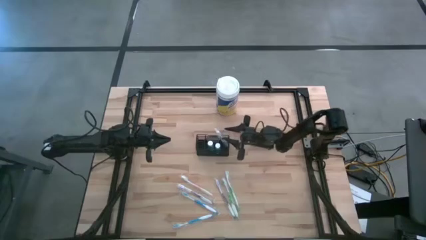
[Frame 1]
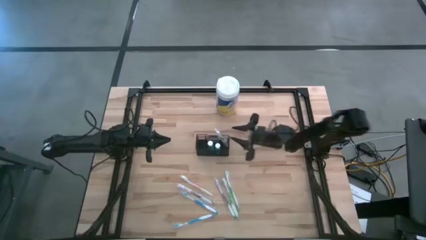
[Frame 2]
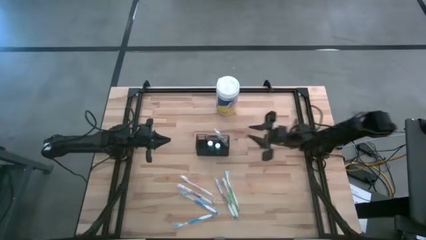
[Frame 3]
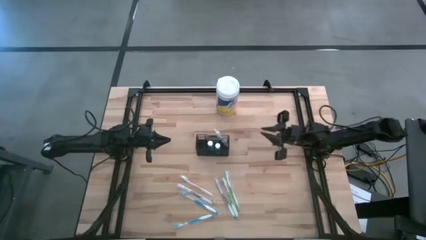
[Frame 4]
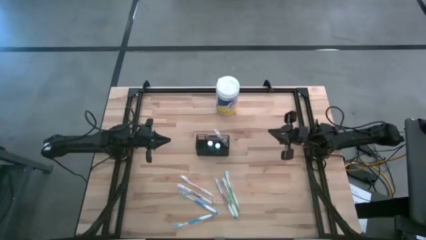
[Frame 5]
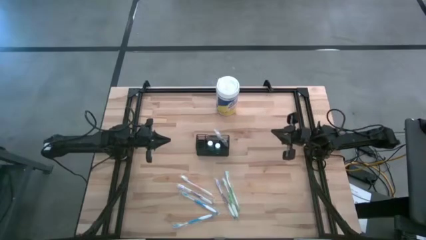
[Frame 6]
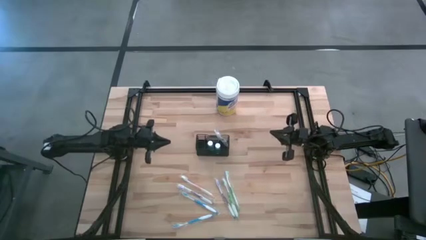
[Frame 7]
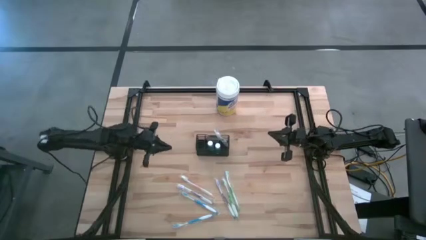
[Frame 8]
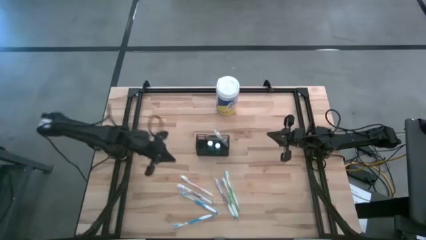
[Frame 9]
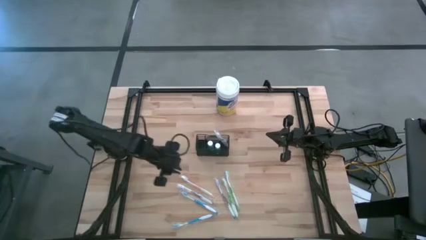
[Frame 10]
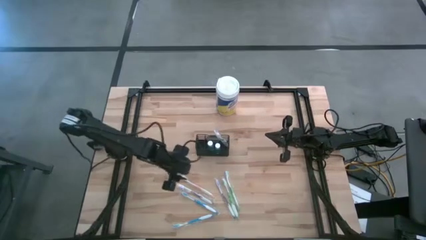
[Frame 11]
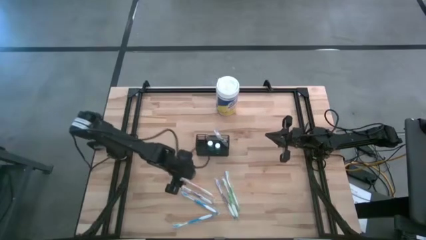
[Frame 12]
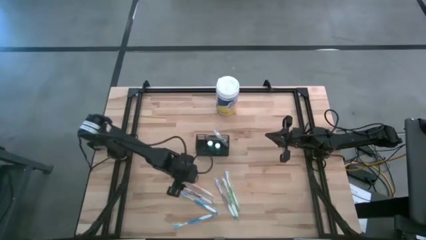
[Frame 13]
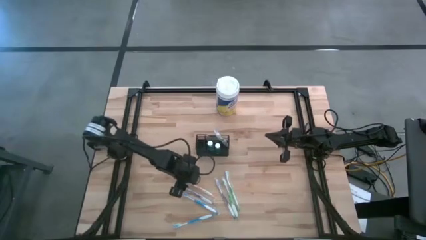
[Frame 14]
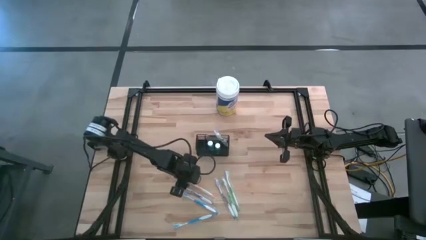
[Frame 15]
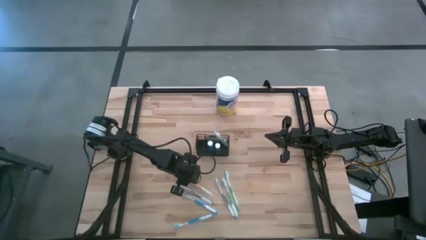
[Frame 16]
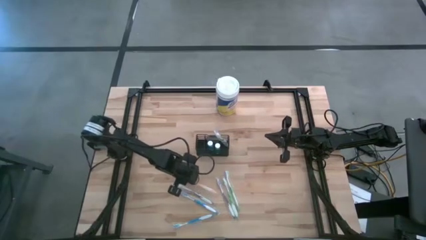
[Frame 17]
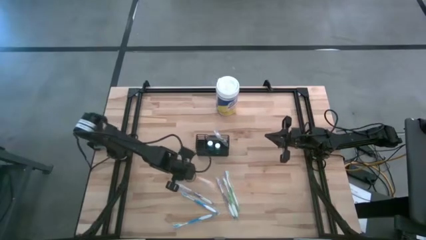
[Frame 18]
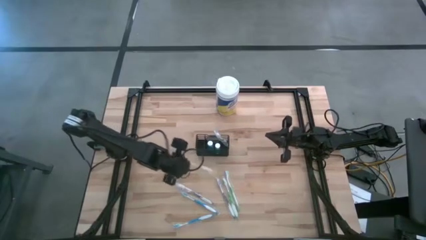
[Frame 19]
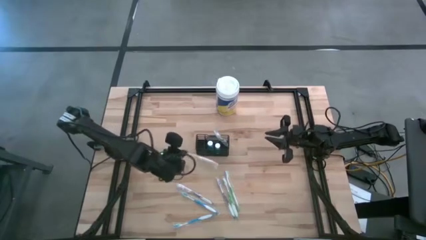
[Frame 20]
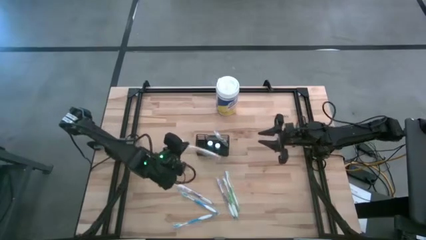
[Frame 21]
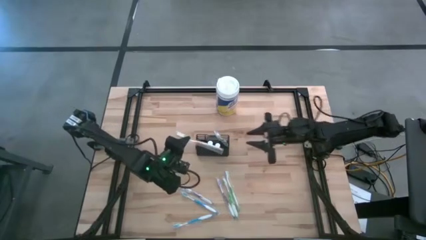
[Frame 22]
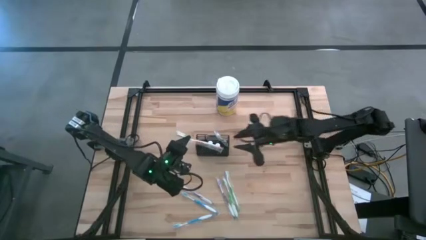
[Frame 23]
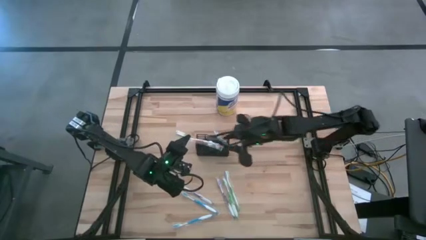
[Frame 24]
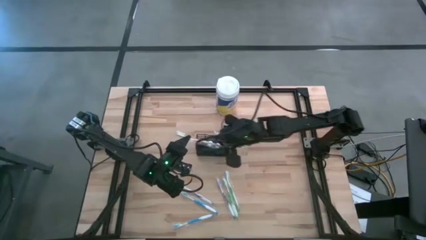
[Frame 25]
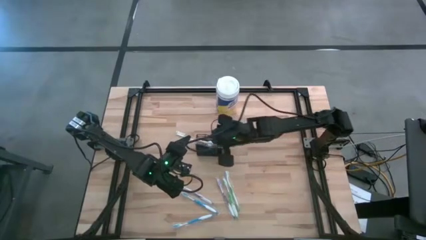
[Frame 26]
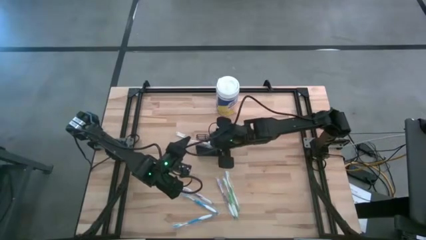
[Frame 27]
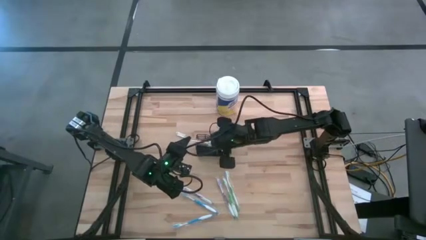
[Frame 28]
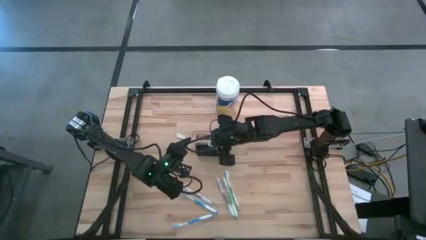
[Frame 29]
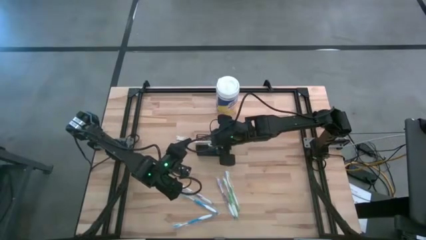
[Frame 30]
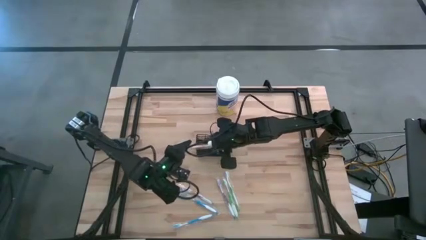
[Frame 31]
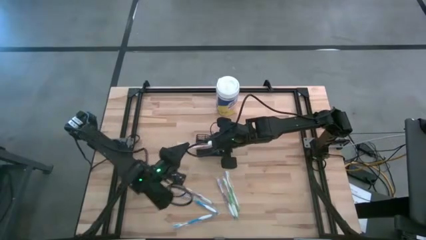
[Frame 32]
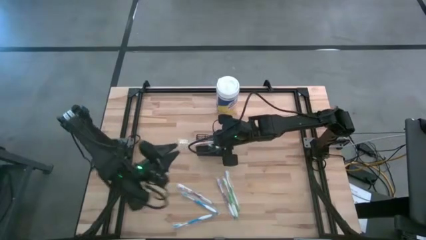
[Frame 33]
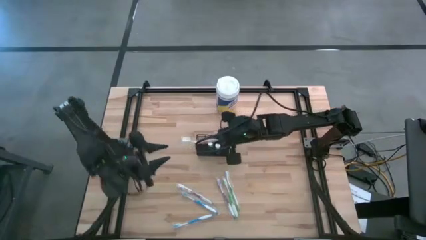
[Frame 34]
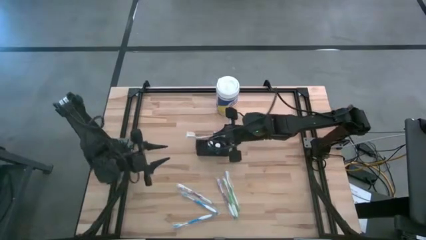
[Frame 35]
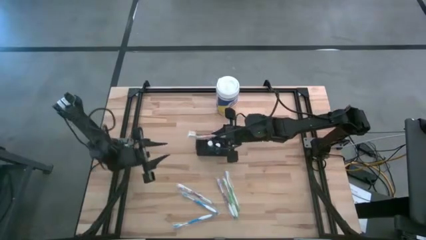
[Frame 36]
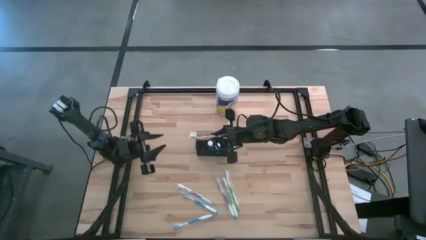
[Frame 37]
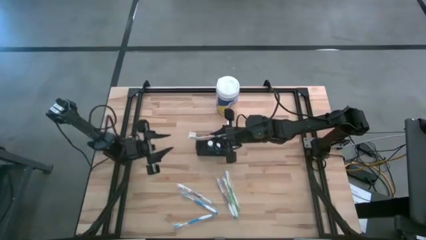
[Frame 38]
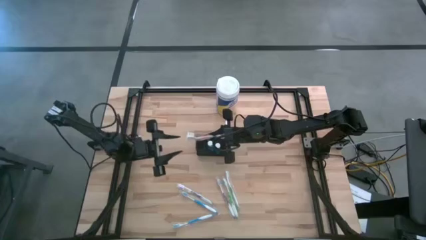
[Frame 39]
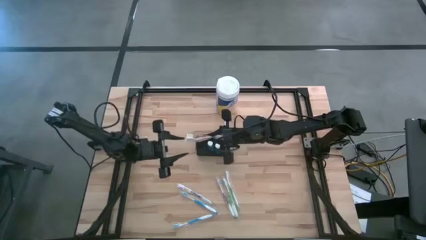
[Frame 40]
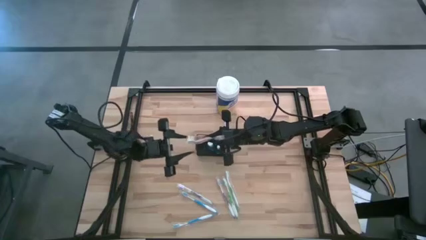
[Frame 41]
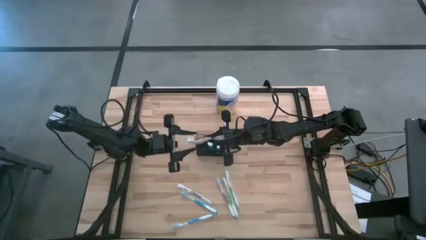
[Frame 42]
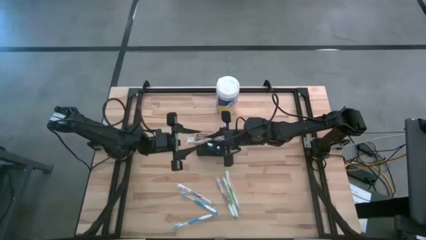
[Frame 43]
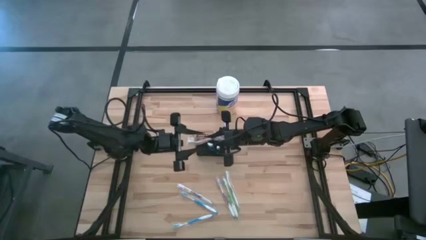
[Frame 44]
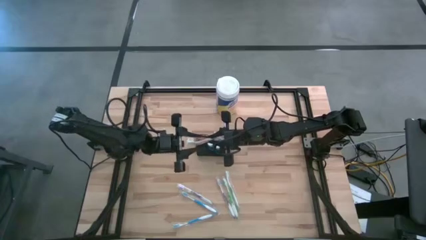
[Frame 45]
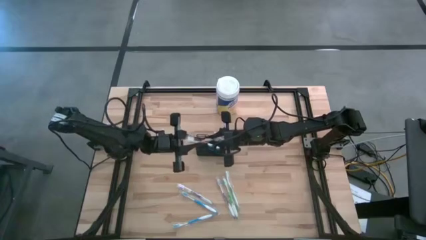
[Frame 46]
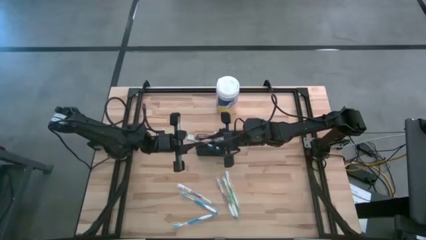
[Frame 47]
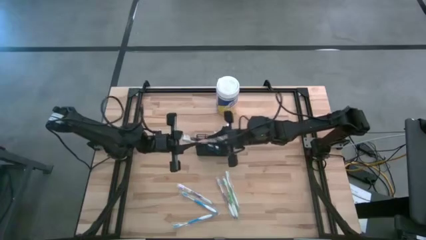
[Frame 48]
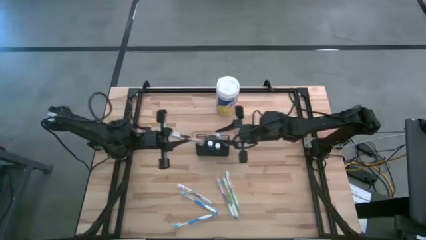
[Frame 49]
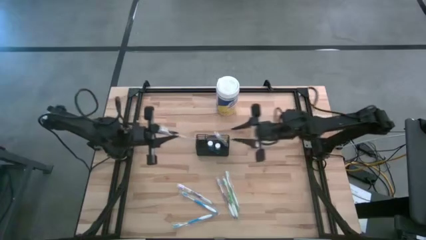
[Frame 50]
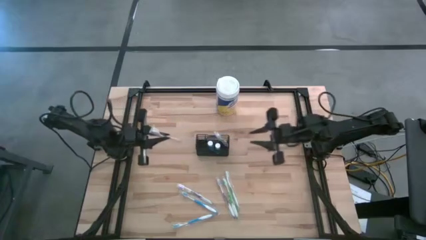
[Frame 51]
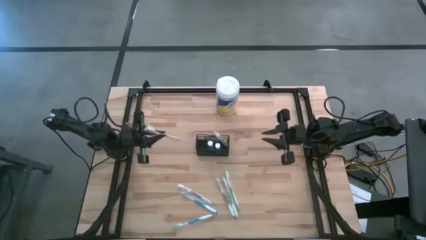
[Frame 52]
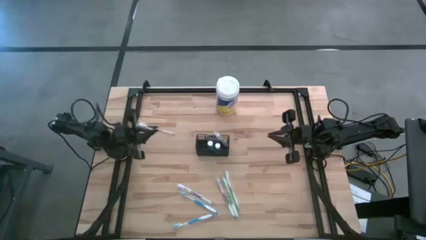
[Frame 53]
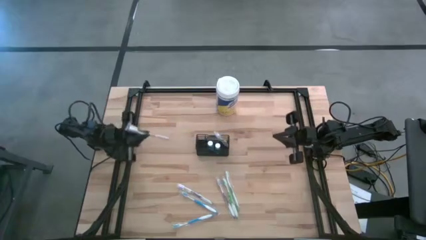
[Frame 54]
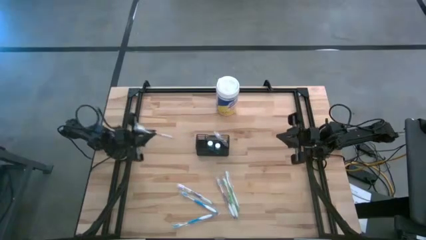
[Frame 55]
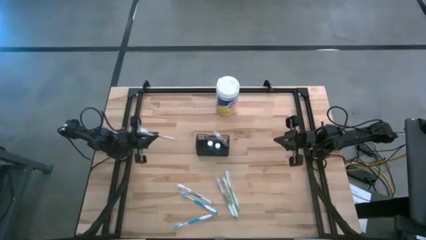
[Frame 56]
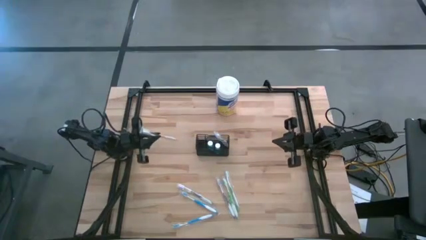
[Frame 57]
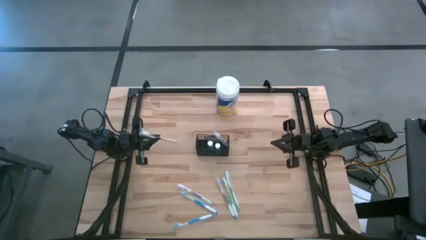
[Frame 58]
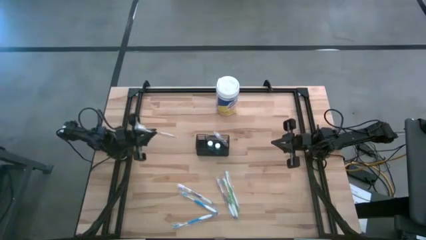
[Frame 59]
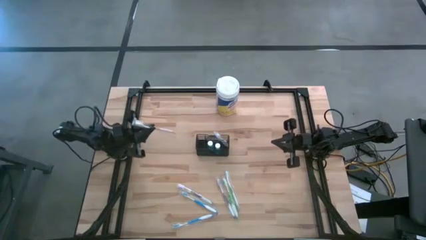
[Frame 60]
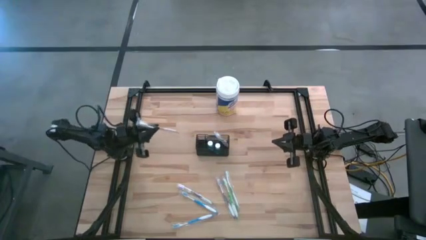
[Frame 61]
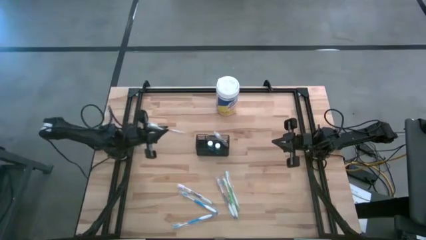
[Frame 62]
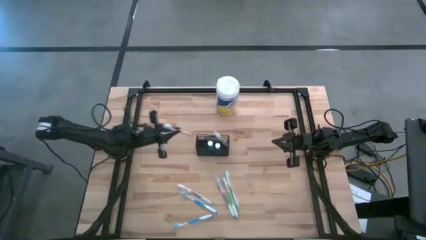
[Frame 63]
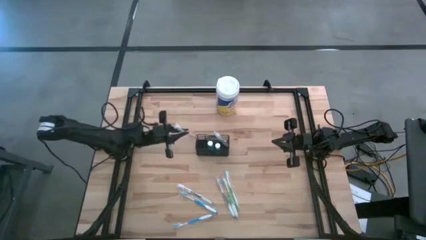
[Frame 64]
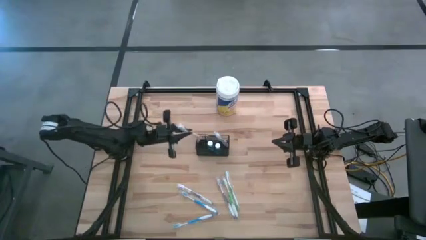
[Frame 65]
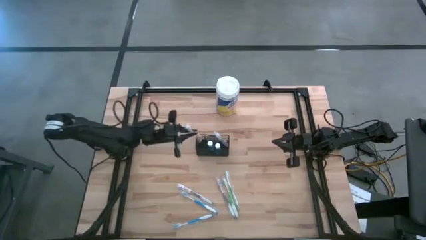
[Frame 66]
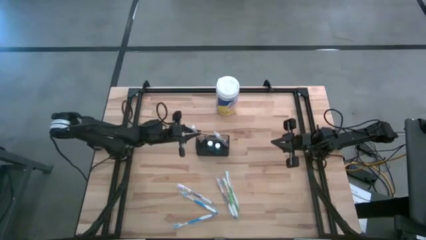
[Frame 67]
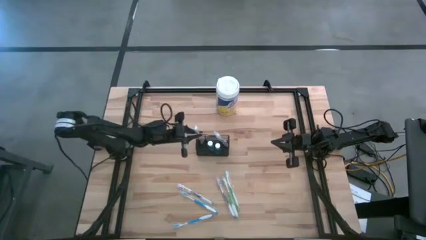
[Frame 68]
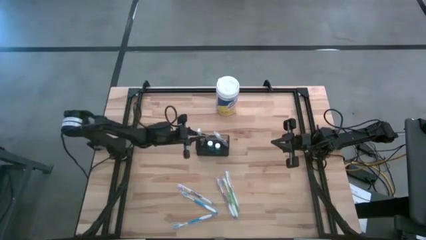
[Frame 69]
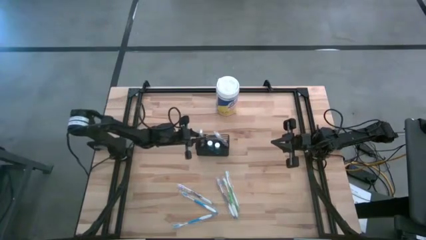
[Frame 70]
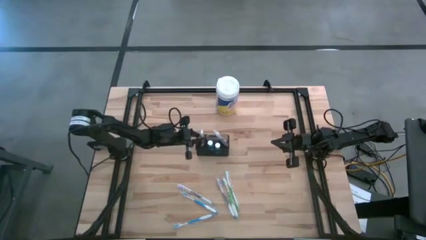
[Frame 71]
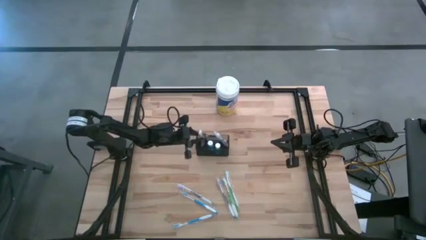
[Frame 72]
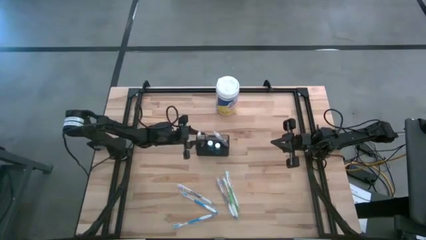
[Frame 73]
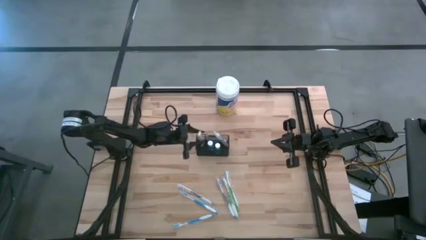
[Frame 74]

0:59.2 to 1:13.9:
Task: Pick & Place toothbrushing station
Put the orange toothbrush into the black wire organizer

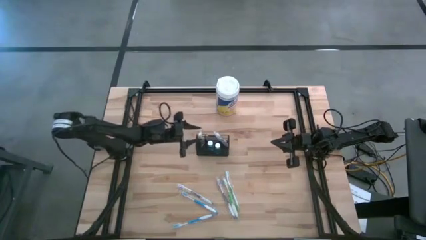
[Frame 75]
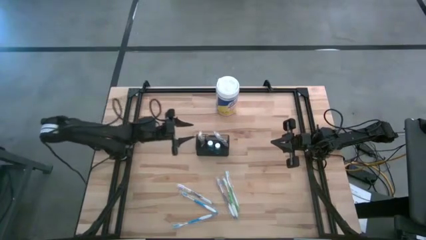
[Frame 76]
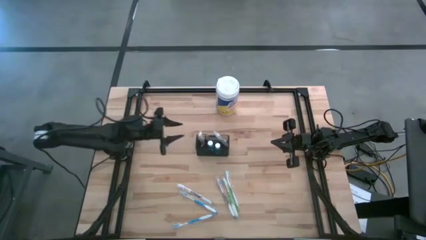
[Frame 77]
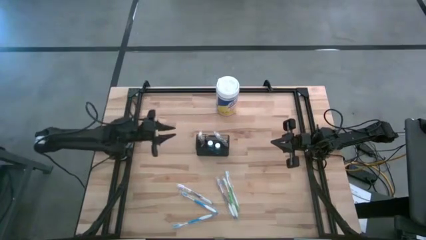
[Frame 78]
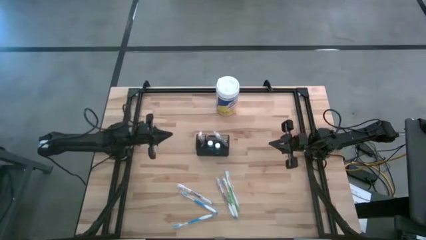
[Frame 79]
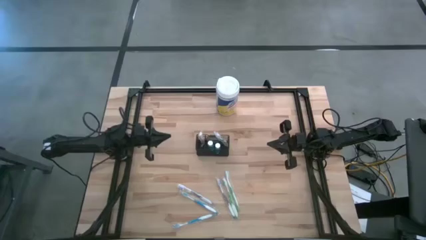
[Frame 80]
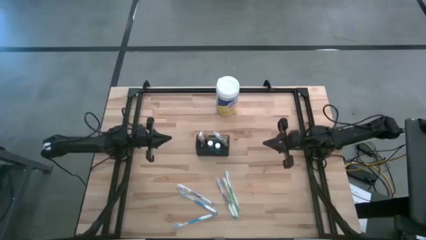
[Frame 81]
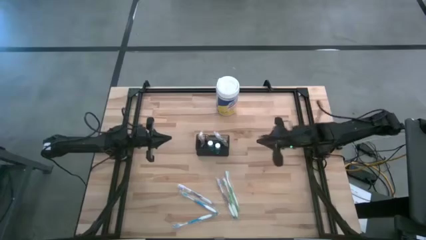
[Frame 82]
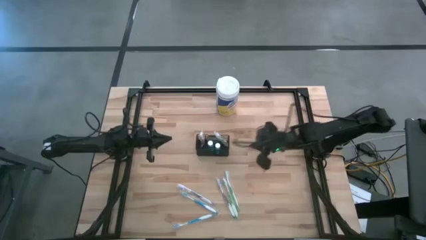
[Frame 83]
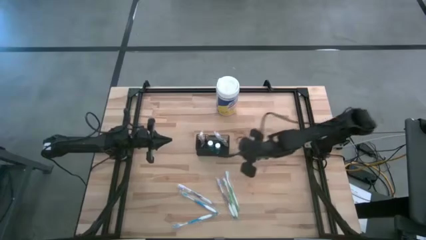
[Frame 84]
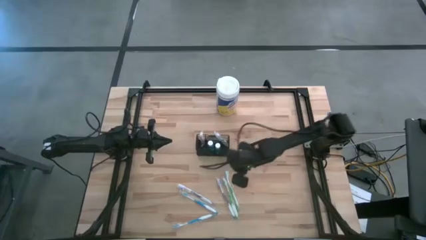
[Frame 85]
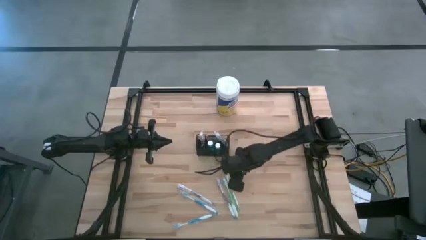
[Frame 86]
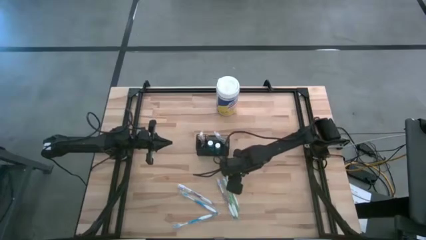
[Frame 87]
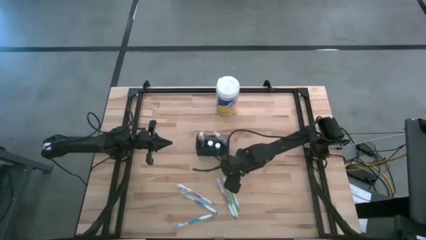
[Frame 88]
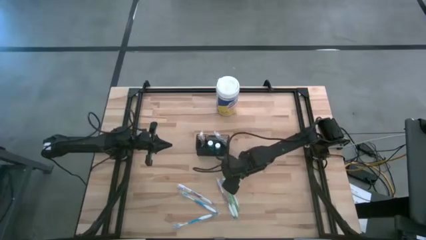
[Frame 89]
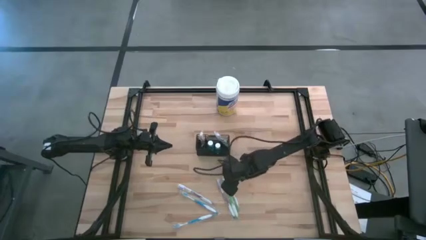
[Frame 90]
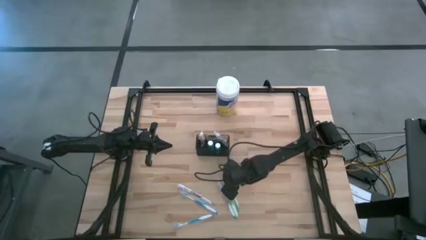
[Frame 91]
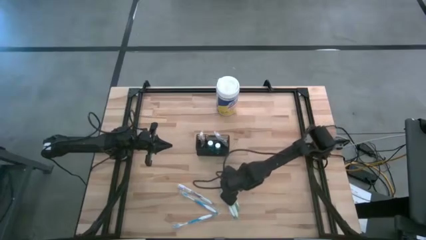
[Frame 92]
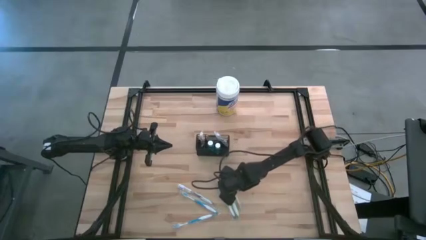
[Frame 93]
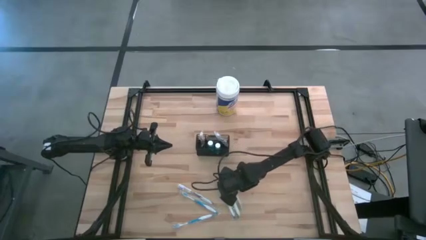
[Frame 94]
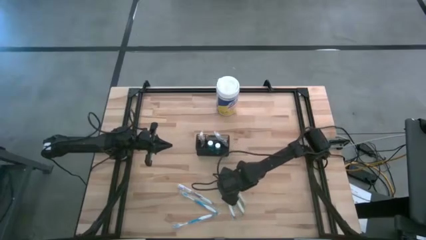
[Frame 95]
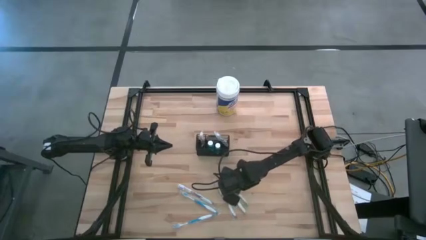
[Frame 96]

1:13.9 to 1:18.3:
Put the right green toothbrush into the black wire organizer
